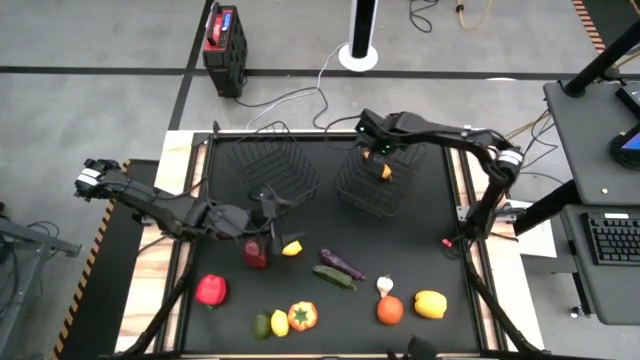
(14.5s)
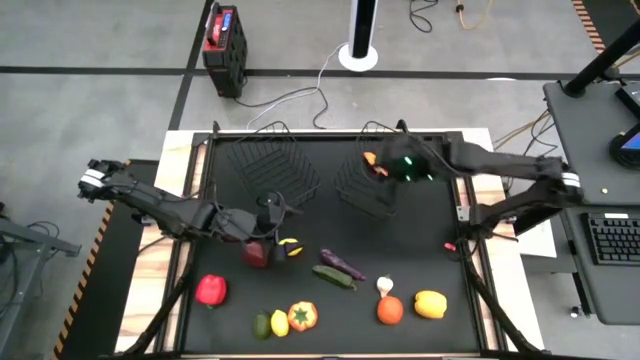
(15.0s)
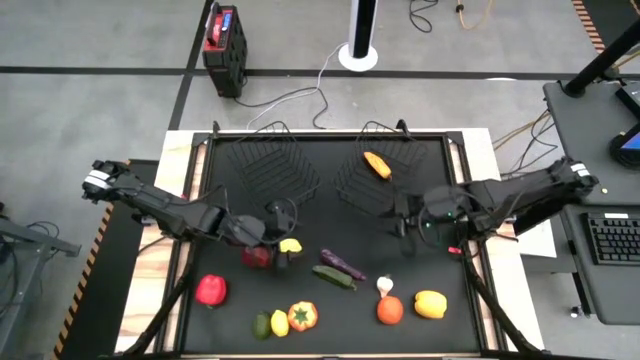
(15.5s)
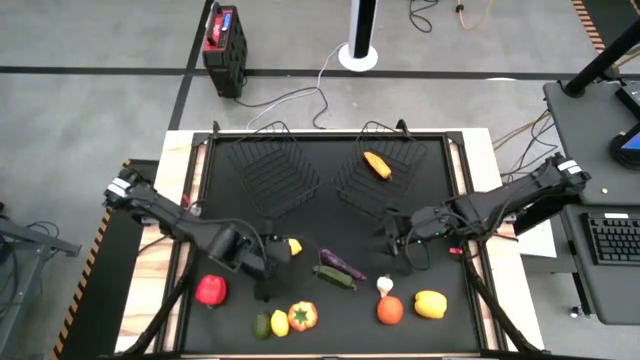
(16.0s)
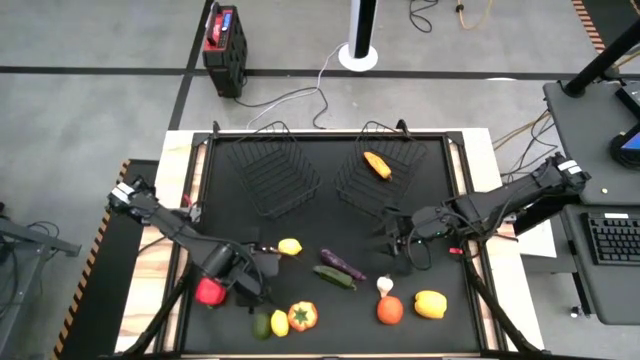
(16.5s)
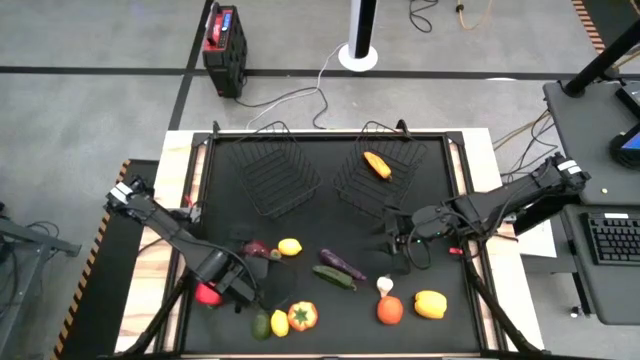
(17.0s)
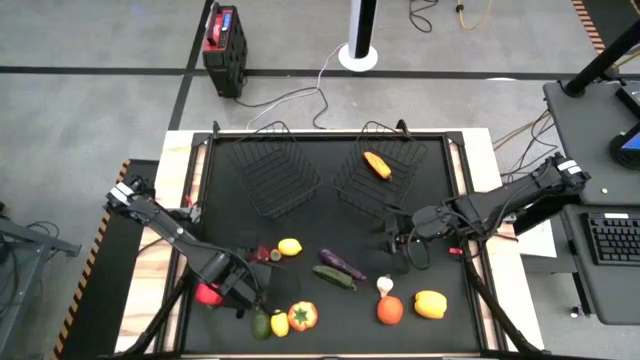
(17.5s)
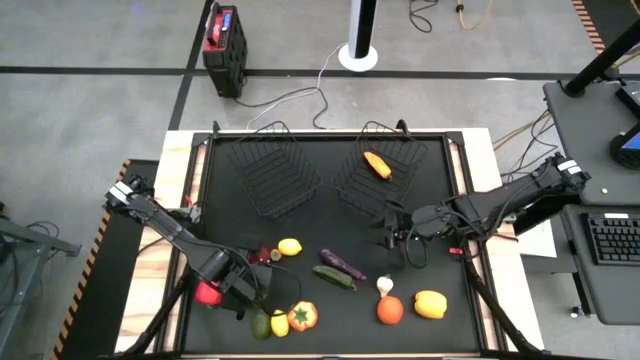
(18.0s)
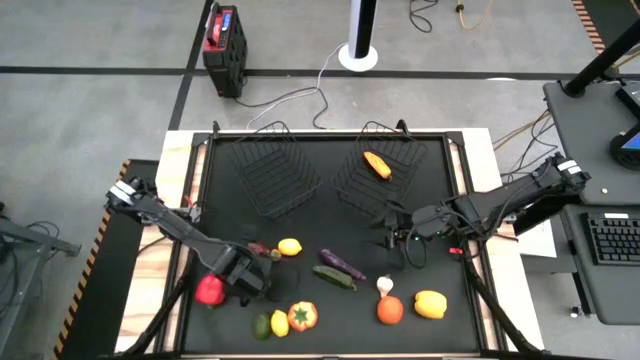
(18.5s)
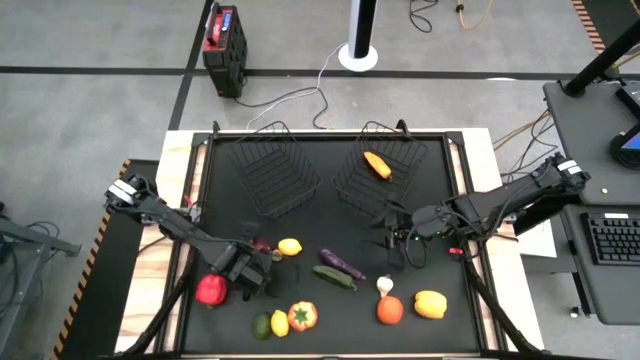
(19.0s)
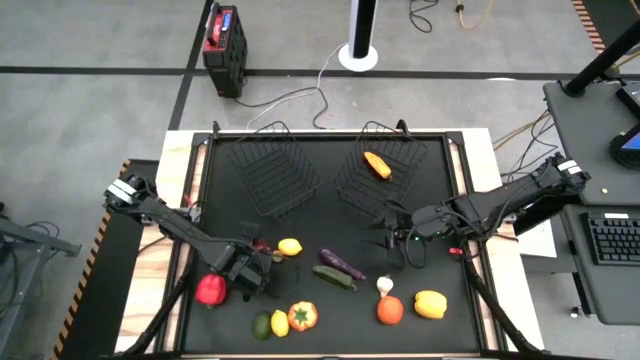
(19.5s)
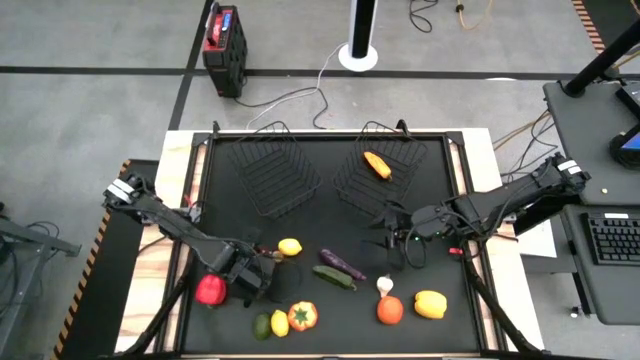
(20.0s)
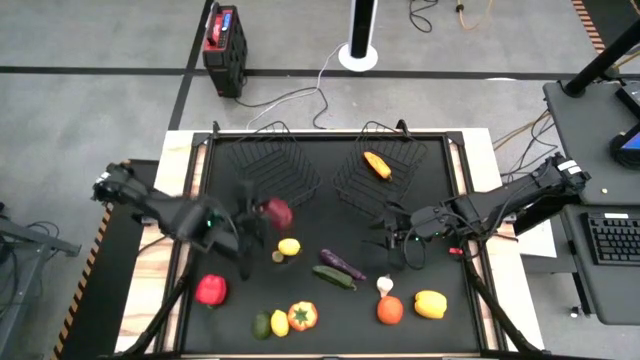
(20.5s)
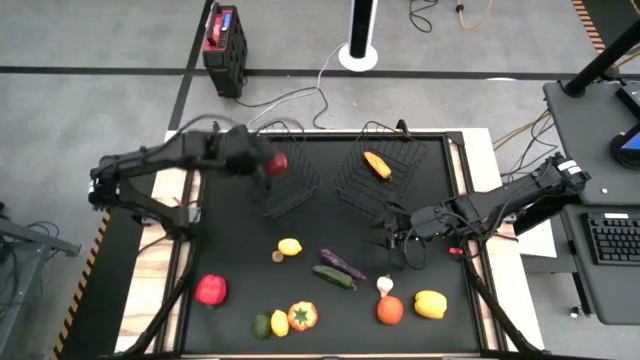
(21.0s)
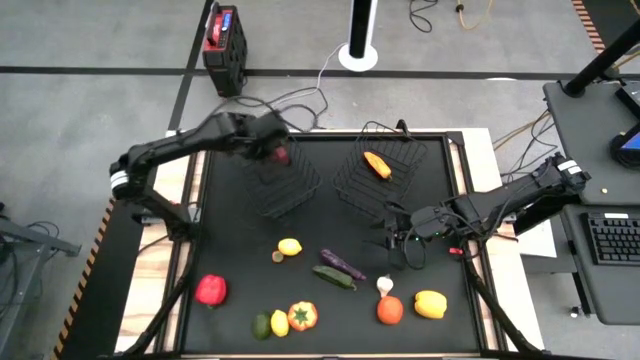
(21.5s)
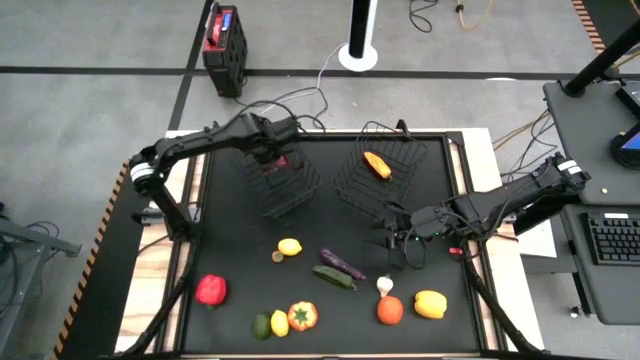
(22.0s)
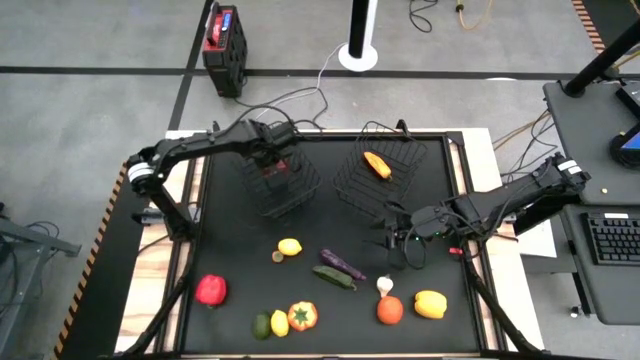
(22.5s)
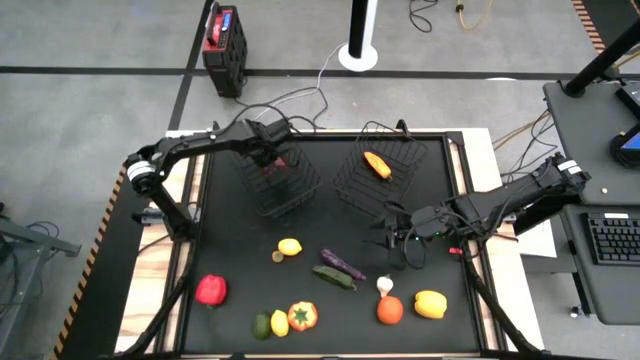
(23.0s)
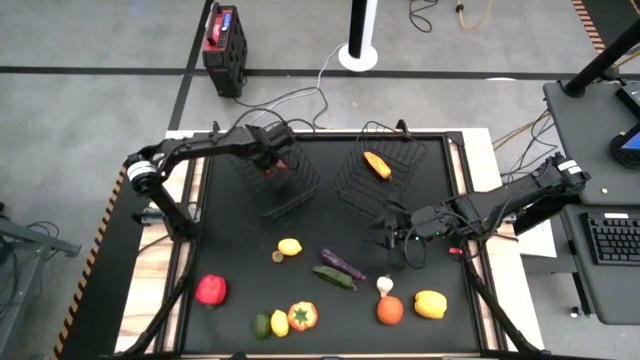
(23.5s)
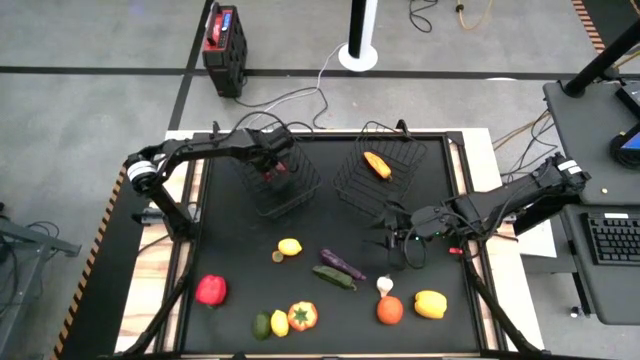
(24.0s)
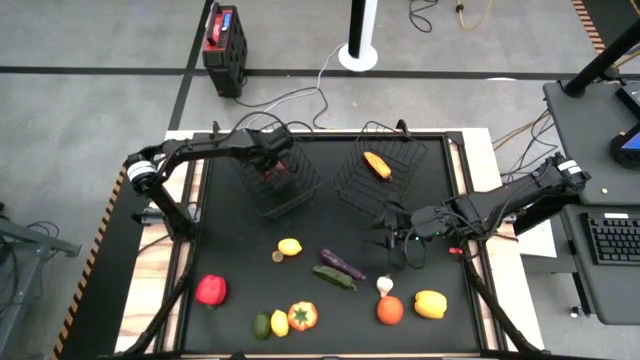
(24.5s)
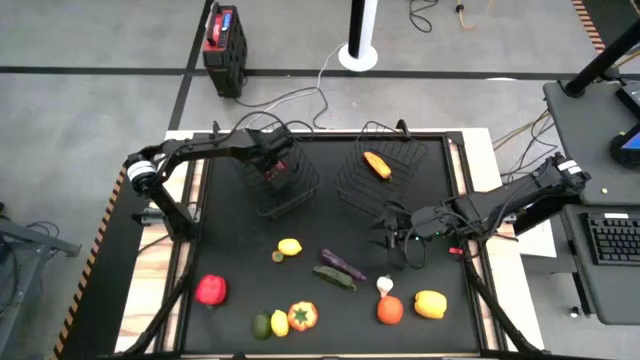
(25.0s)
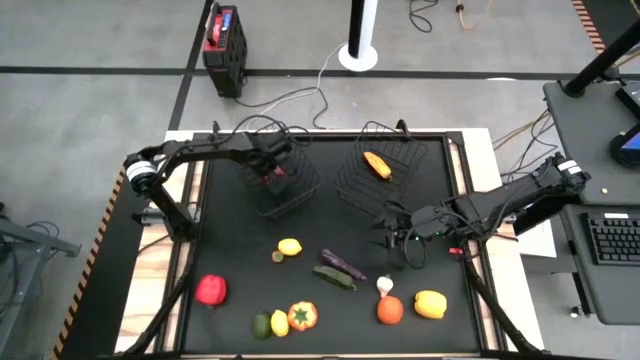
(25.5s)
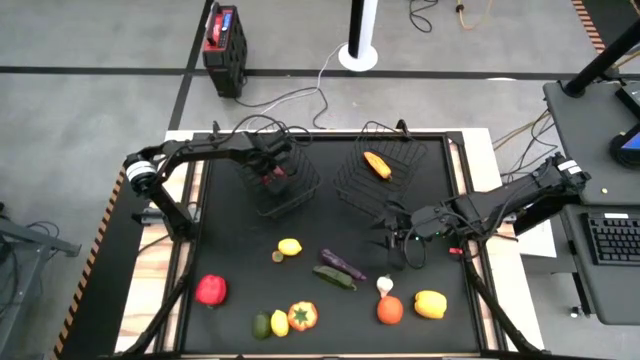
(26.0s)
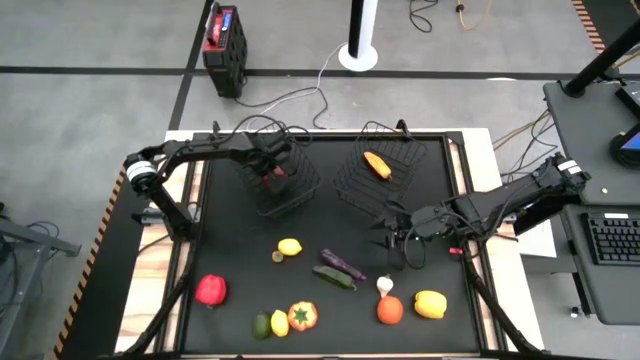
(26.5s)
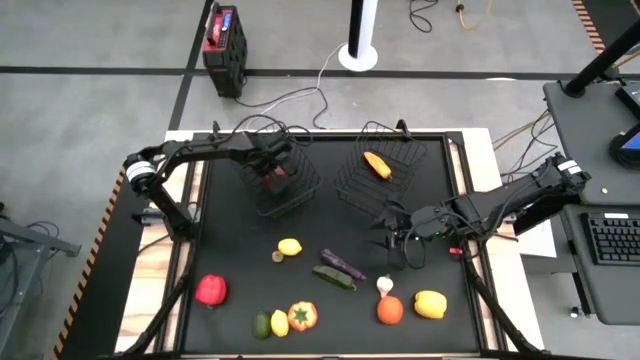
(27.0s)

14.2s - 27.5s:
Task: Sort produce into baskets
Put the apple into the left black wire basket

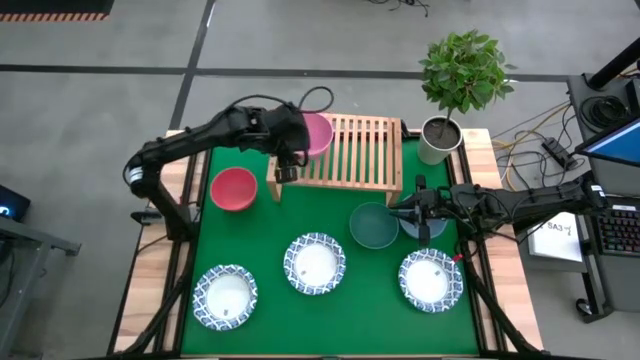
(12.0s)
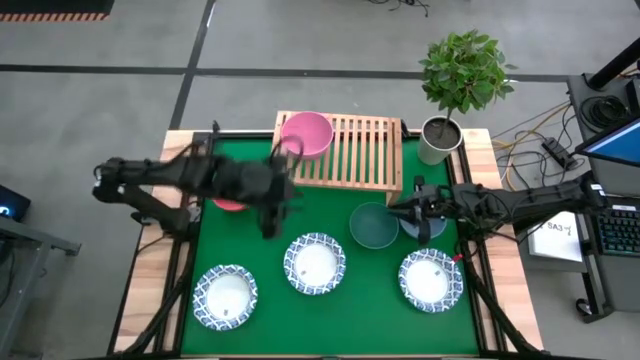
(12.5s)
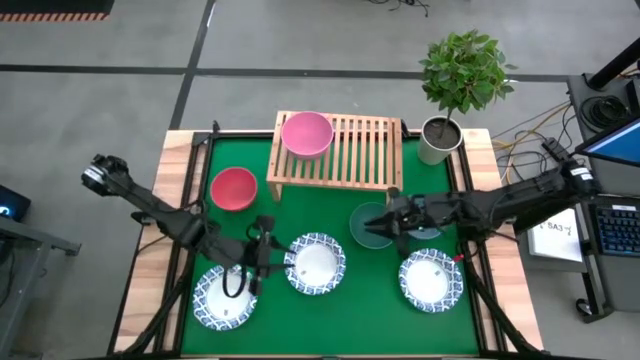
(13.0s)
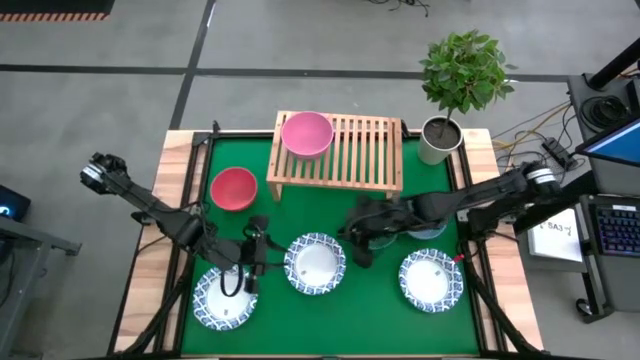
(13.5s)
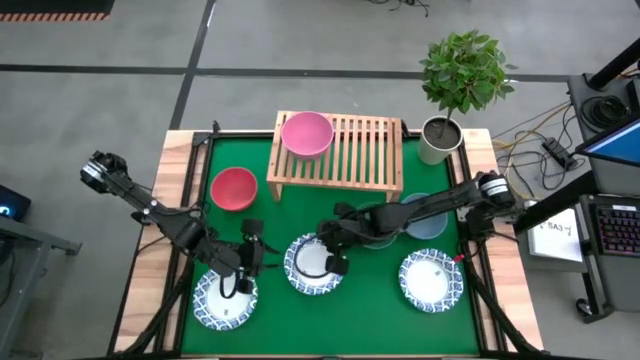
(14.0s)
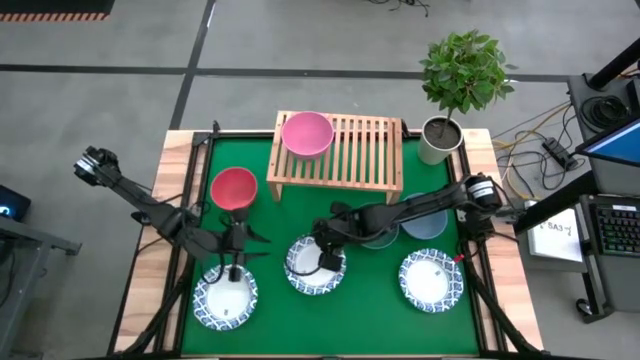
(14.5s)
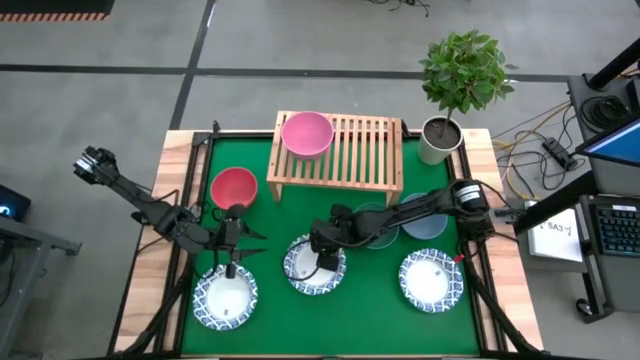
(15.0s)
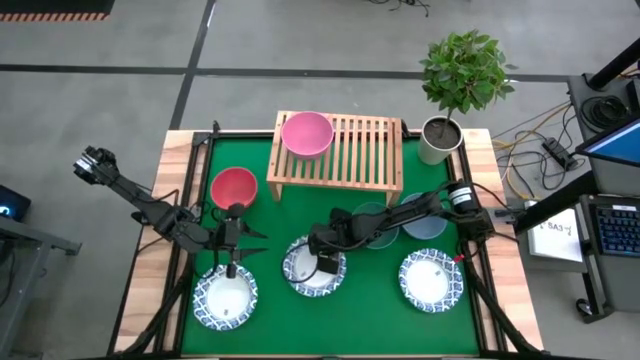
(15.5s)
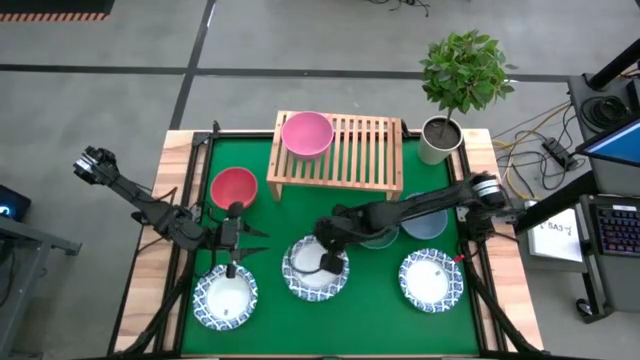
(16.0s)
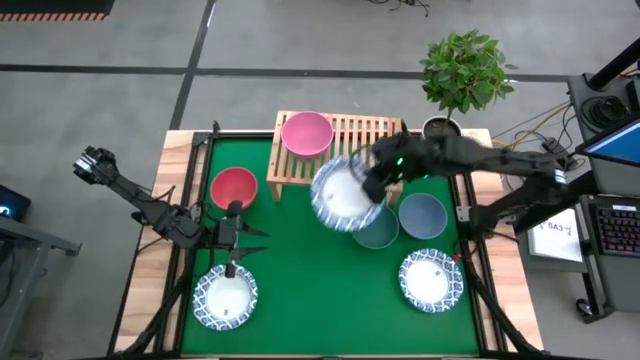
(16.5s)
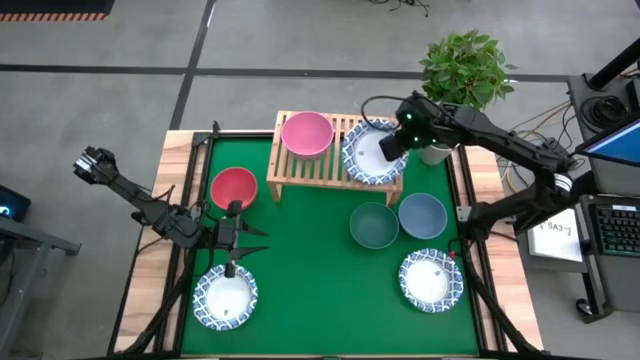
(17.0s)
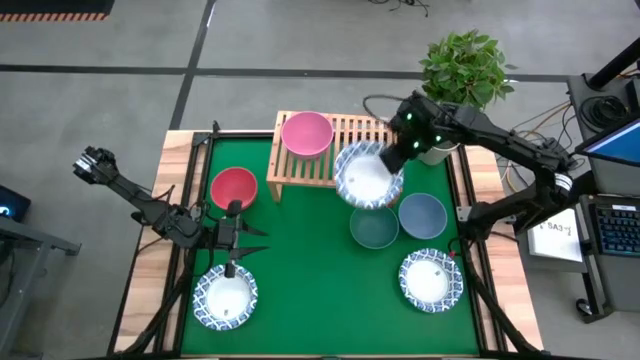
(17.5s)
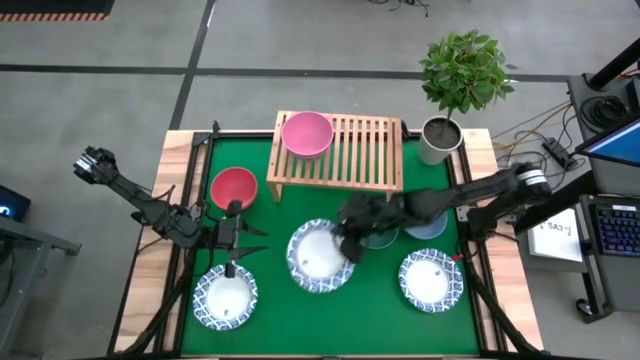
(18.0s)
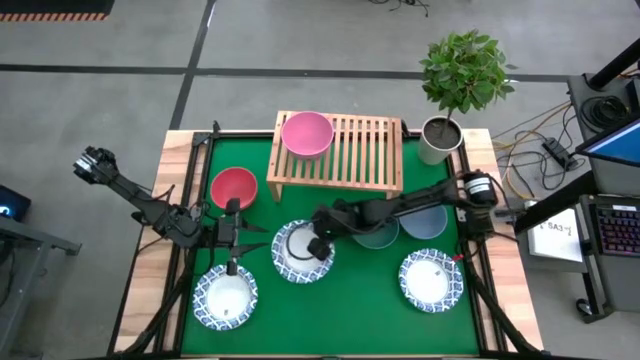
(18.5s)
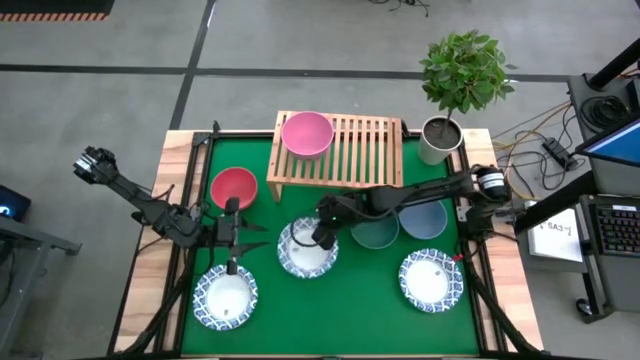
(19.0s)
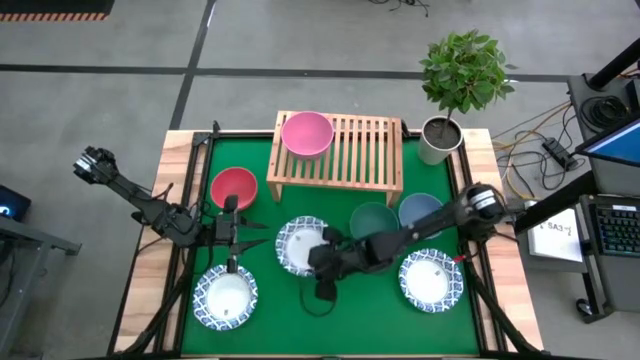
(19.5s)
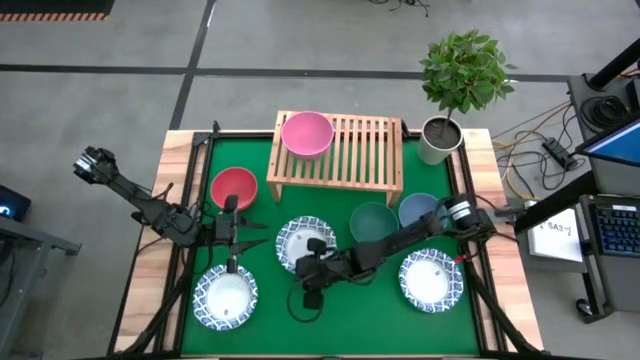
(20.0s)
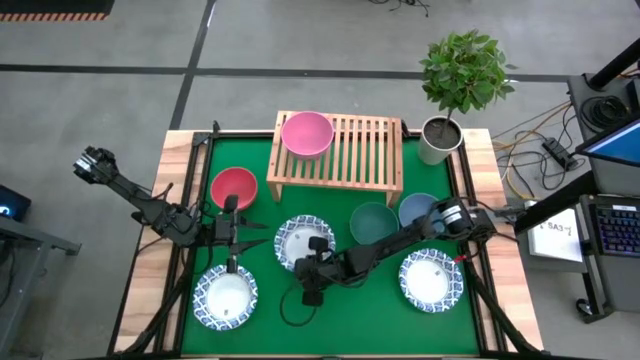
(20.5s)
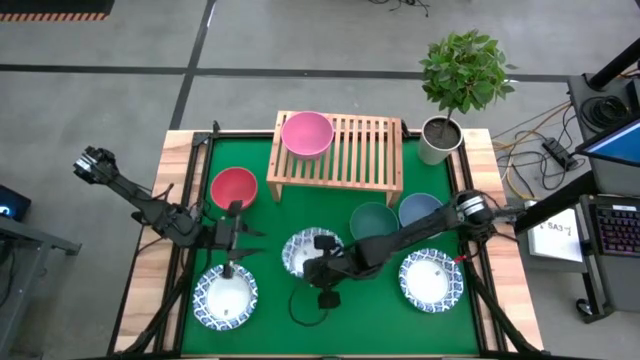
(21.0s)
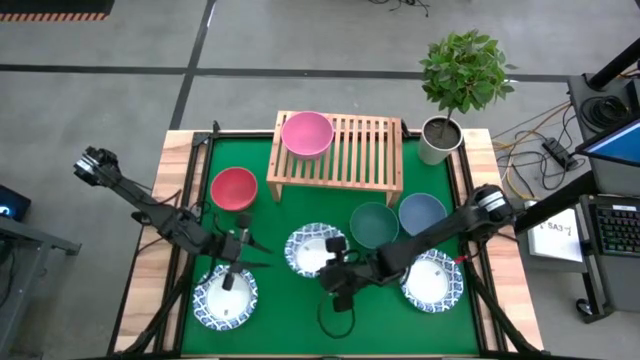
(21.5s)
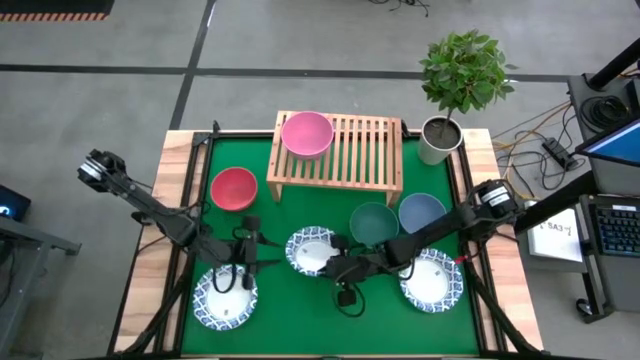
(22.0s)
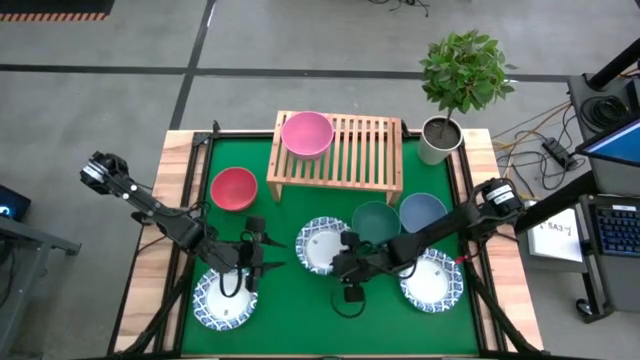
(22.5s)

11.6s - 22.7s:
Task: Place and stack bowls onto a shelf
Put the white bowl on the shelf
